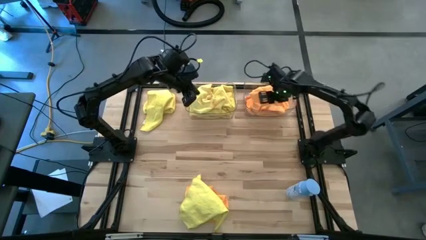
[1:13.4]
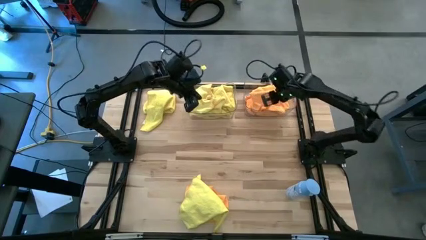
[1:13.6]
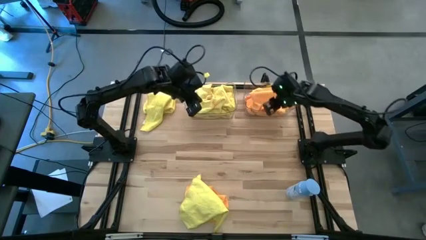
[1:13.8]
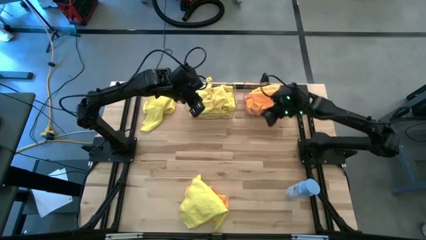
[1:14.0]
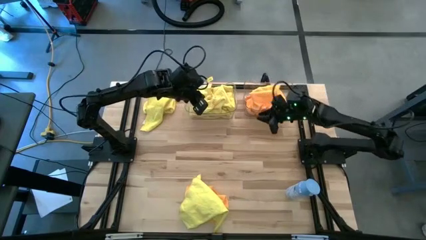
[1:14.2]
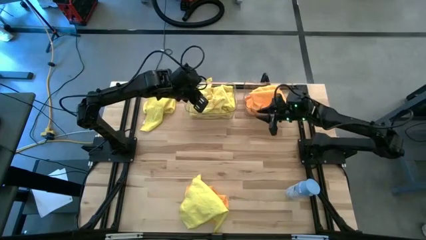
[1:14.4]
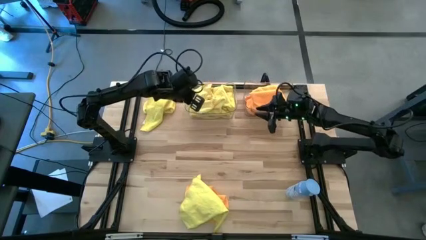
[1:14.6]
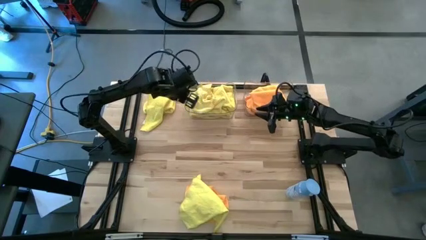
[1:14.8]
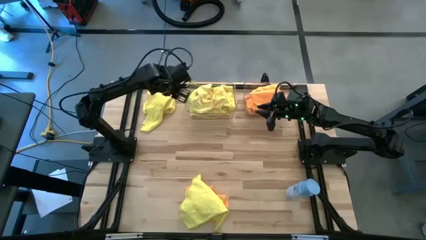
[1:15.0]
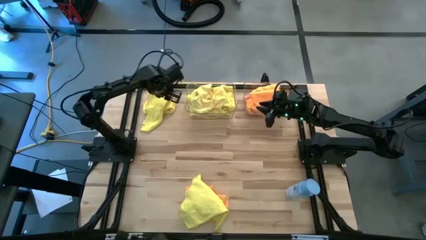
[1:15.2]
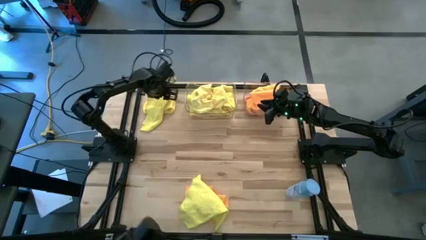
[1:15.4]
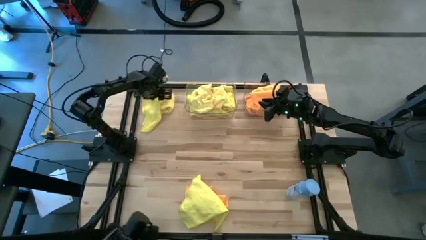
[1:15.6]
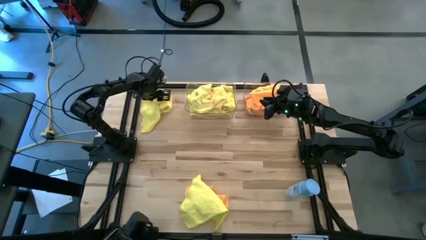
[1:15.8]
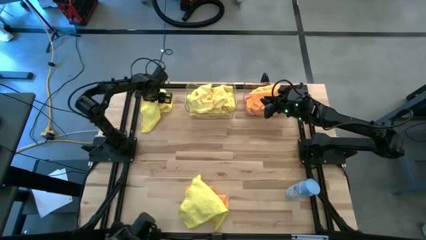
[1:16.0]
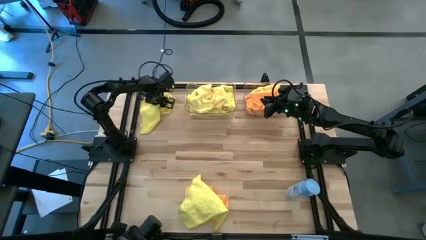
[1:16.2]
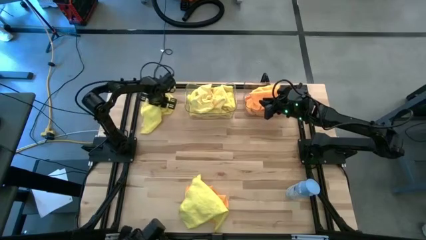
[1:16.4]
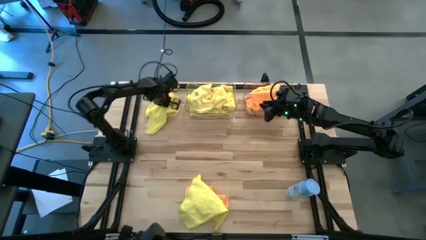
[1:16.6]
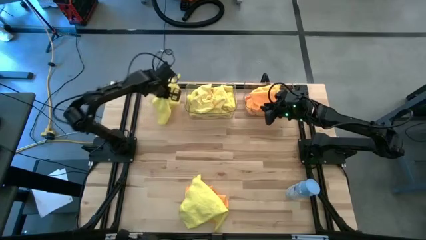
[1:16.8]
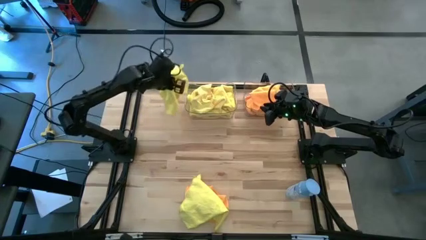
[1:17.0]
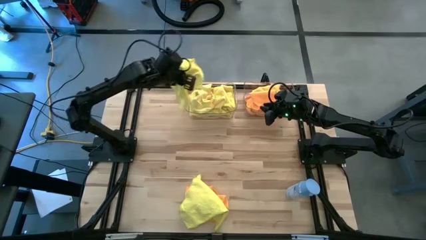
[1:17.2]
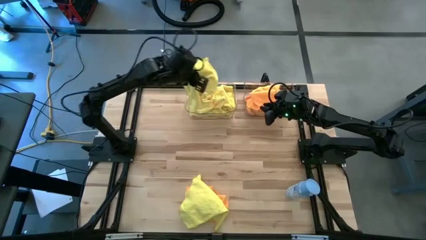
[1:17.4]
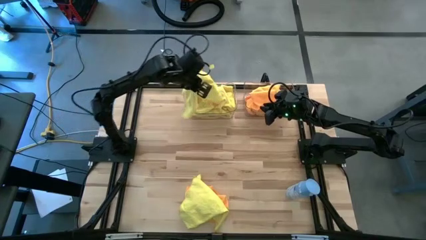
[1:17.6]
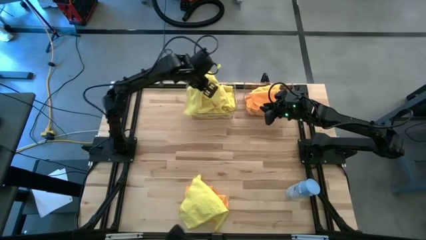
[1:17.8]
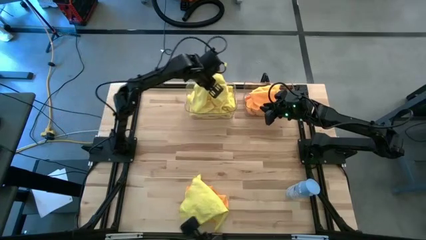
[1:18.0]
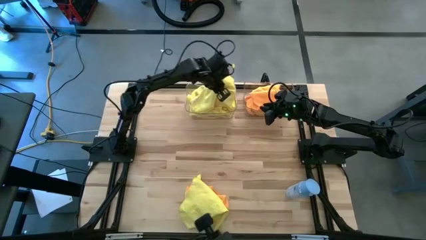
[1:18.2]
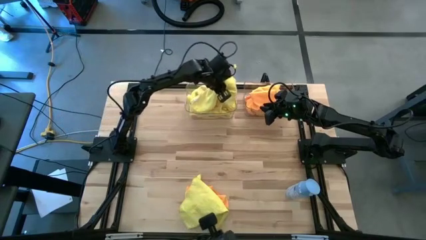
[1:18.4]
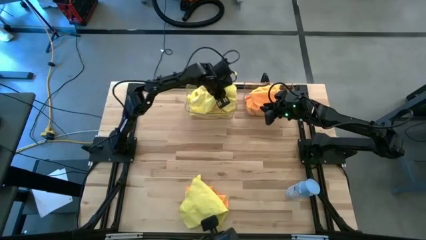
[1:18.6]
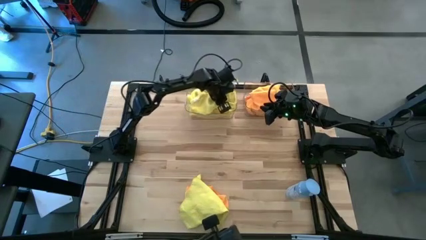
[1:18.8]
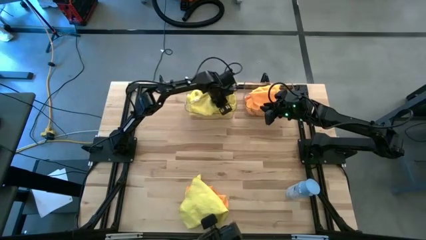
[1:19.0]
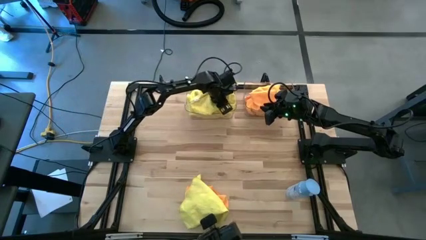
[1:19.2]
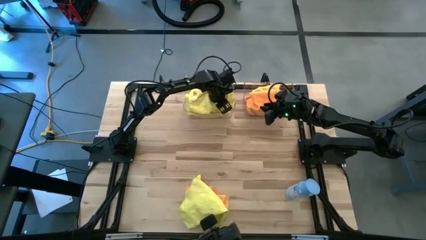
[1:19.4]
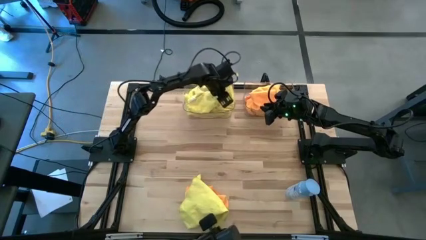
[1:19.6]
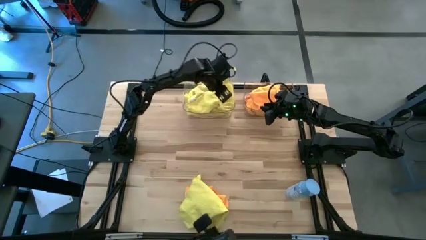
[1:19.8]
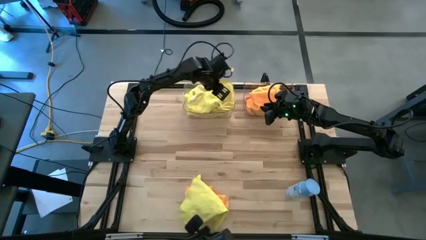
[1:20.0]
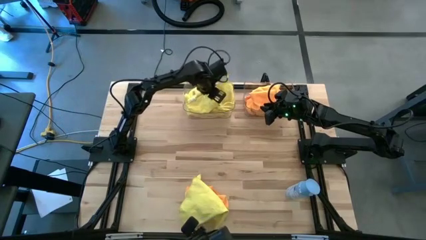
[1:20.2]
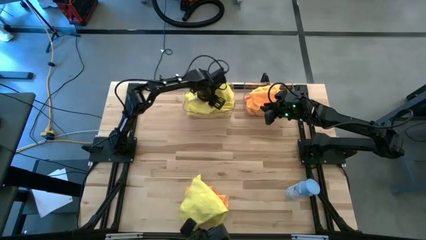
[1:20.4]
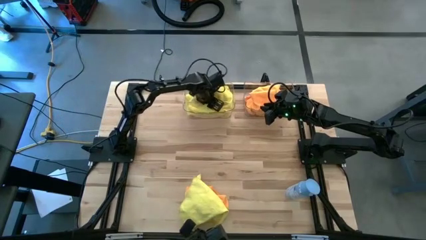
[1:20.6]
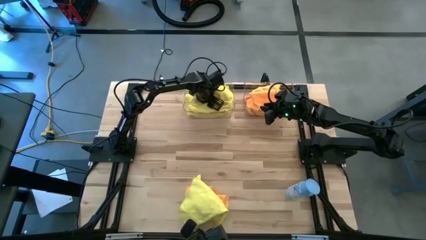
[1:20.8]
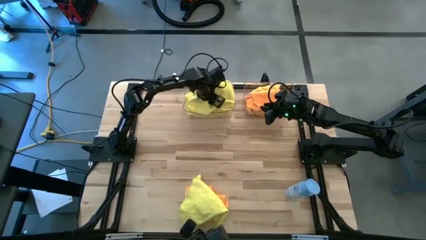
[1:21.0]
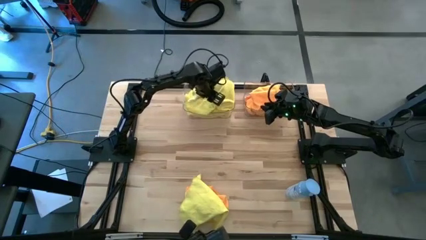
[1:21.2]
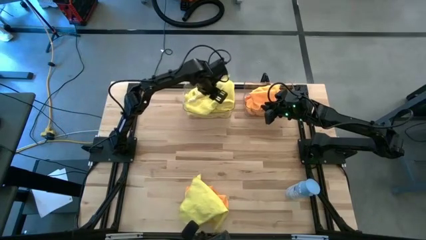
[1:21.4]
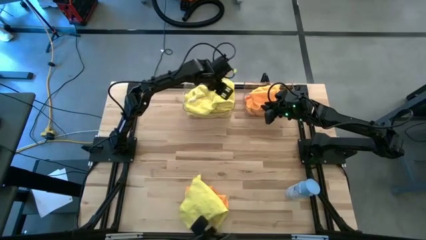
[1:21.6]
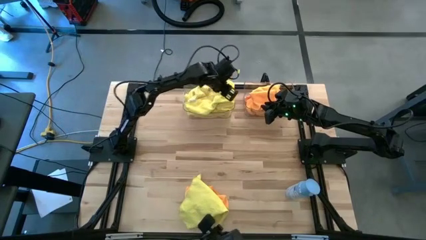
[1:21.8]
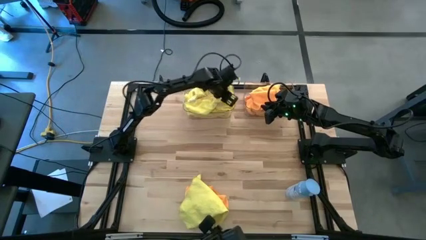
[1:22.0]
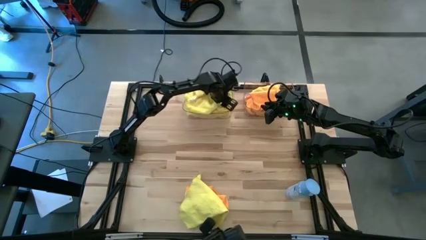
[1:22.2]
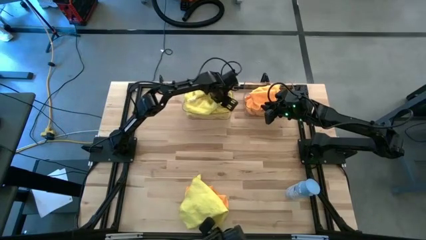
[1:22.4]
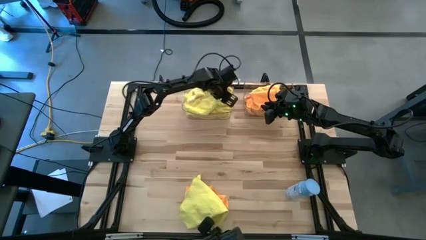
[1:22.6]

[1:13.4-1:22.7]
Task: Sort microfiber towel by color & place in baskets
Put the yellow microfiber cloth into the left transparent bin

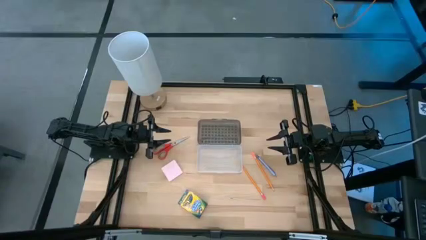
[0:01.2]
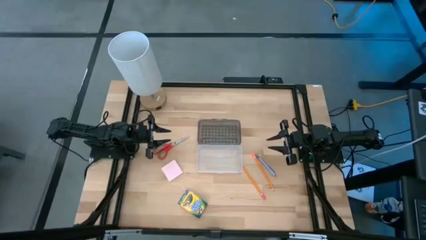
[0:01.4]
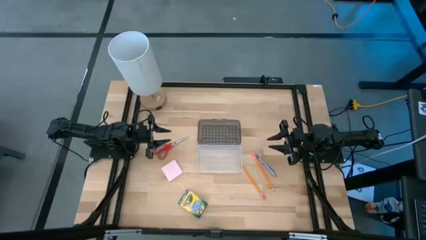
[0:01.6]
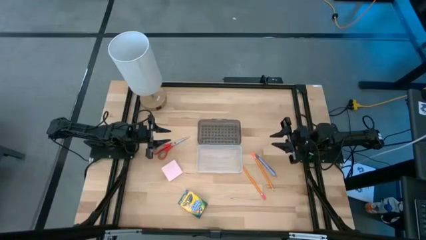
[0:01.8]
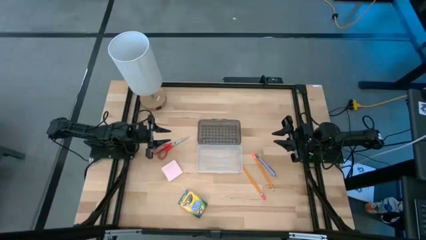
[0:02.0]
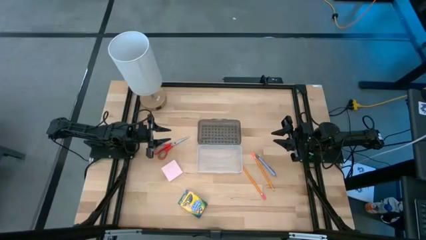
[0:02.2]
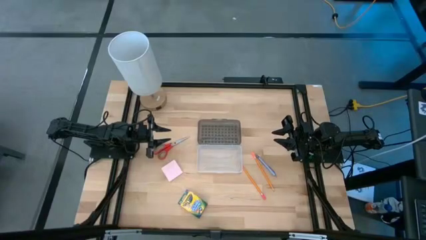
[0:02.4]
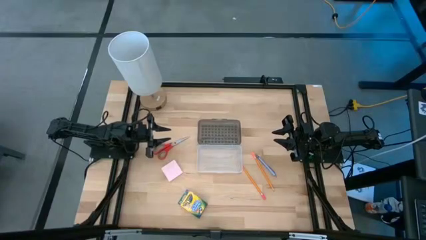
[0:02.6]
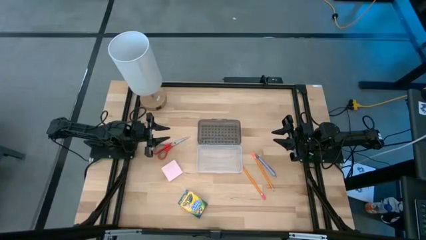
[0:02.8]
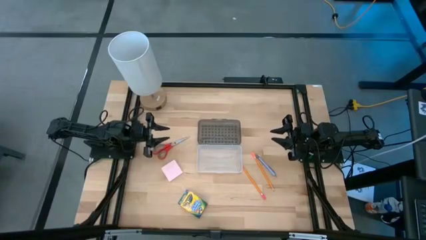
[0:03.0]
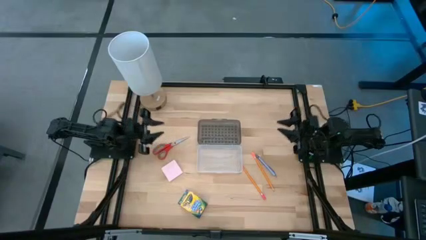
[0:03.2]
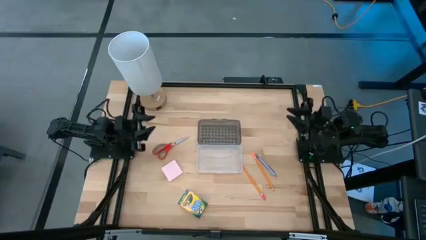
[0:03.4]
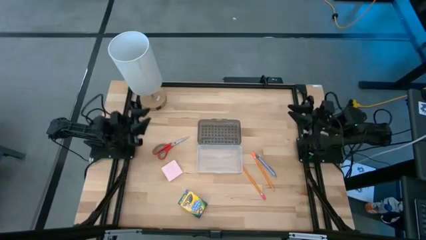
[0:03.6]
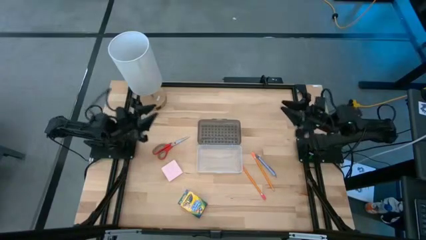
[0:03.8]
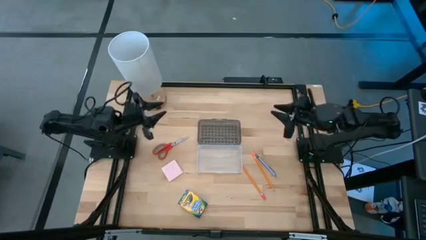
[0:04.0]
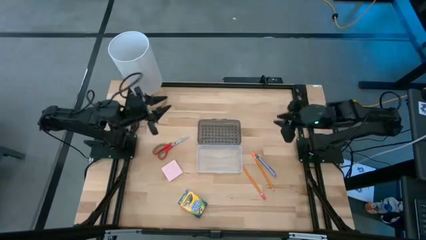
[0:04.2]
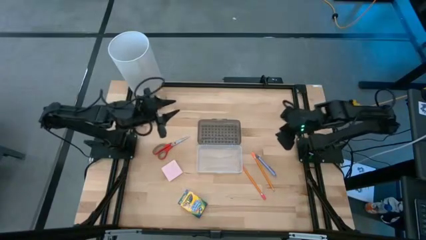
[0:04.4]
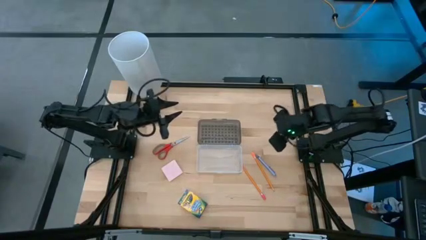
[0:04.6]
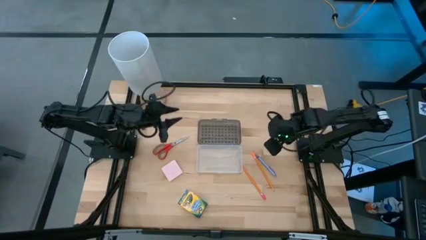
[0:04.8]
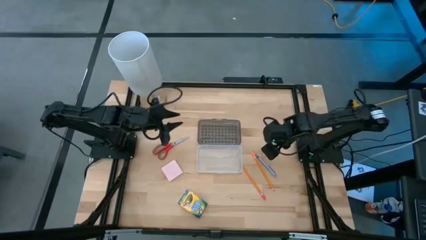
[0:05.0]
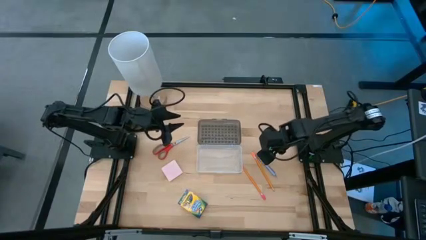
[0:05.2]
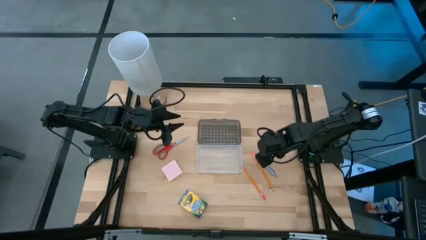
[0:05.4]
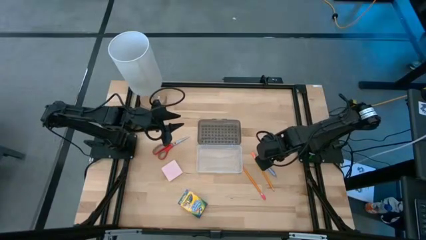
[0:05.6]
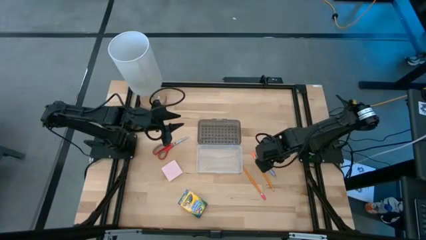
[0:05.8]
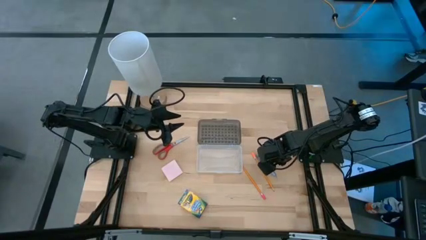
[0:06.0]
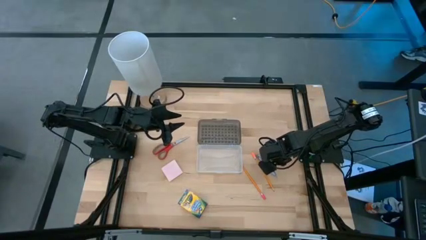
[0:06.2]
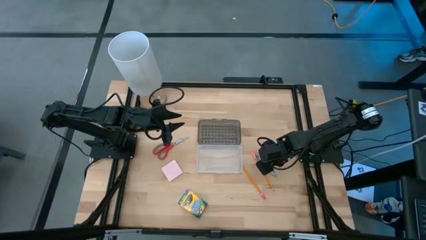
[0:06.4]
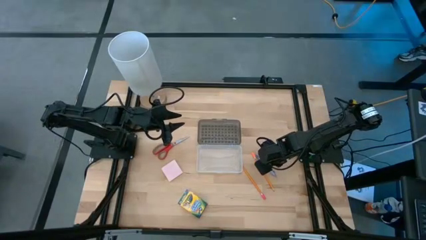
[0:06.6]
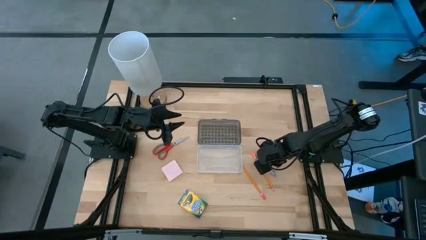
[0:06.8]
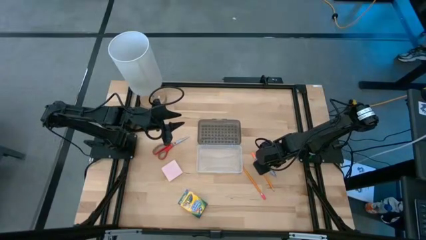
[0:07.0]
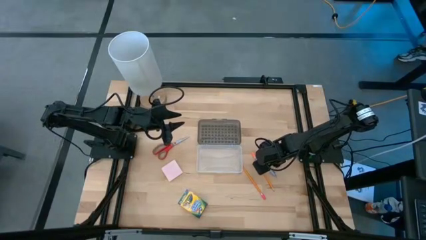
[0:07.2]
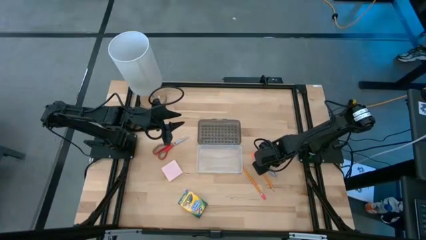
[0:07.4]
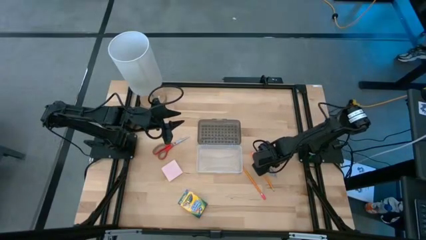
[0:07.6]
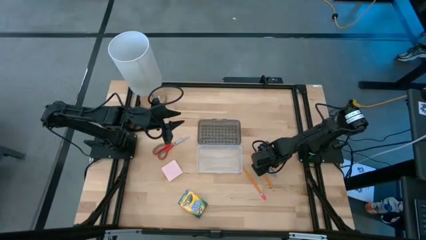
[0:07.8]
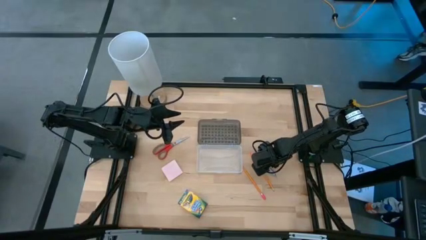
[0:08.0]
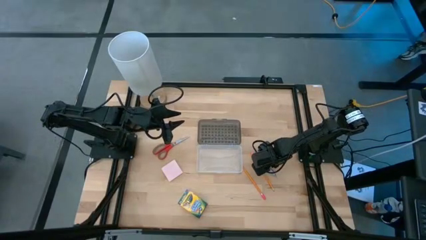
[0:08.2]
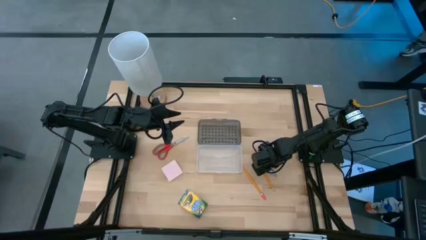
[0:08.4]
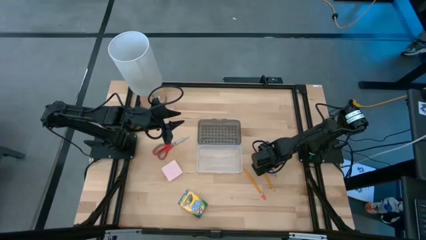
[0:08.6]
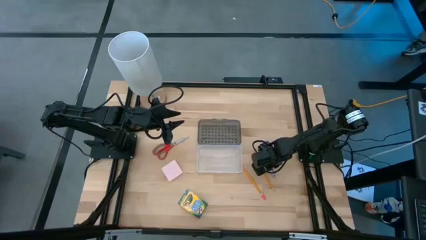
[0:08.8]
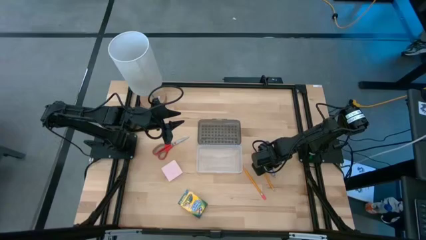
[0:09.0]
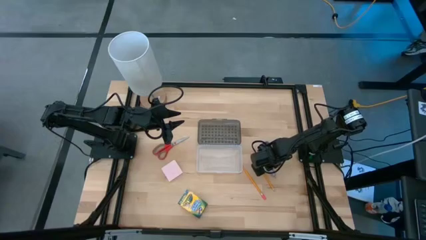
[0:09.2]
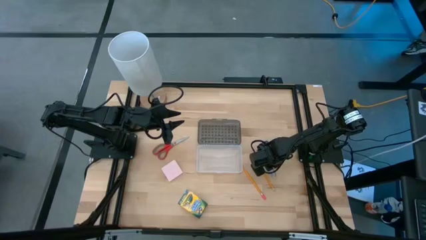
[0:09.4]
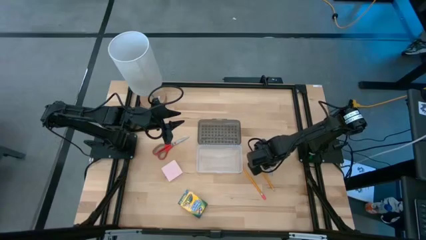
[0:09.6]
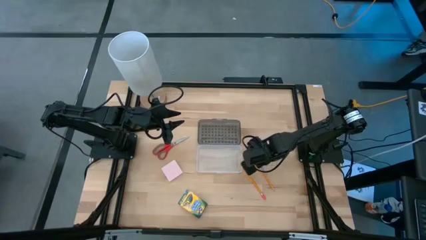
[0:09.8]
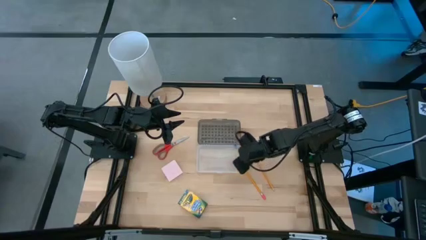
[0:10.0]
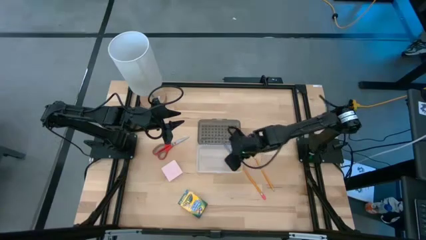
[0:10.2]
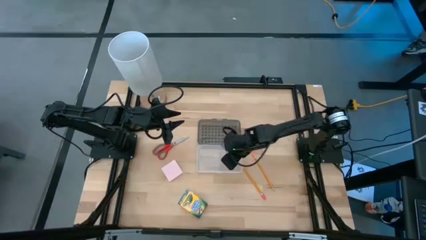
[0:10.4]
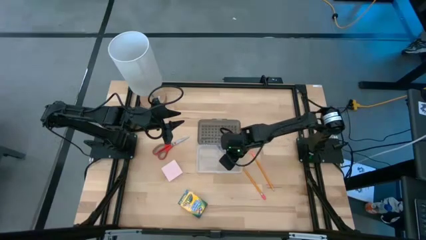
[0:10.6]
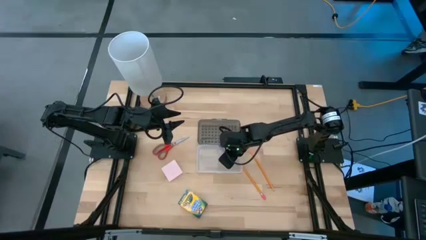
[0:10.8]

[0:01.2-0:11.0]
Task: Pack school essentials
Put the gray pen into the transparent supply box
